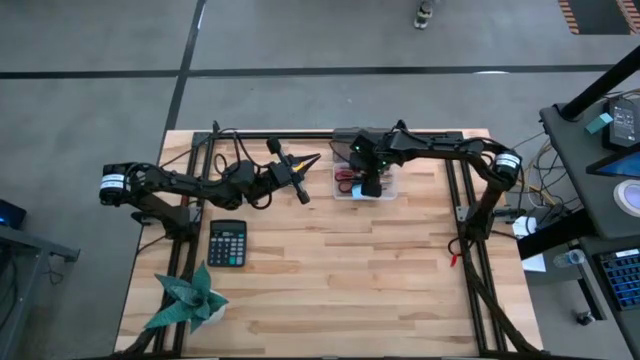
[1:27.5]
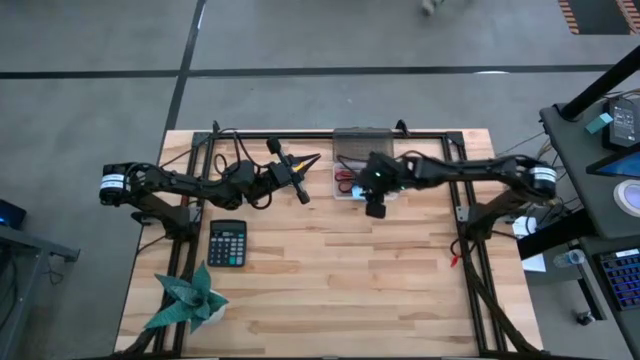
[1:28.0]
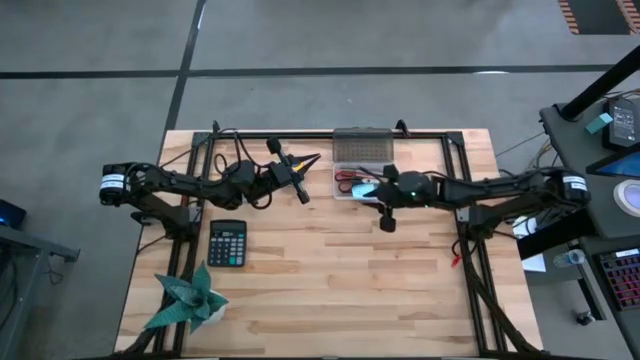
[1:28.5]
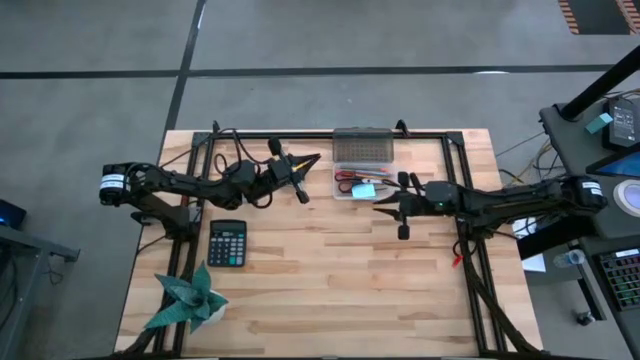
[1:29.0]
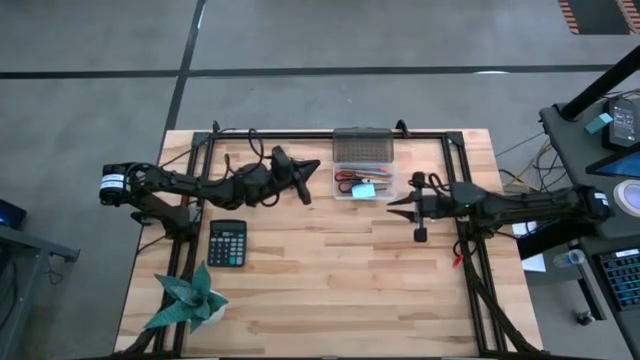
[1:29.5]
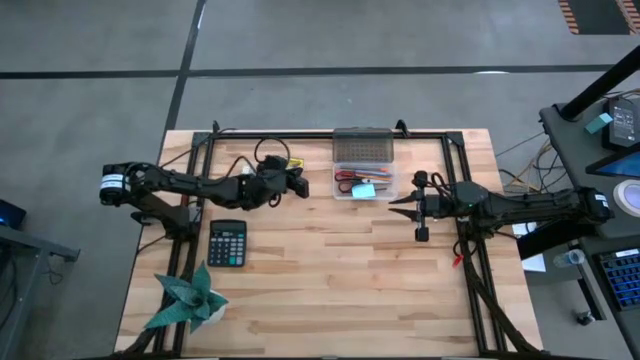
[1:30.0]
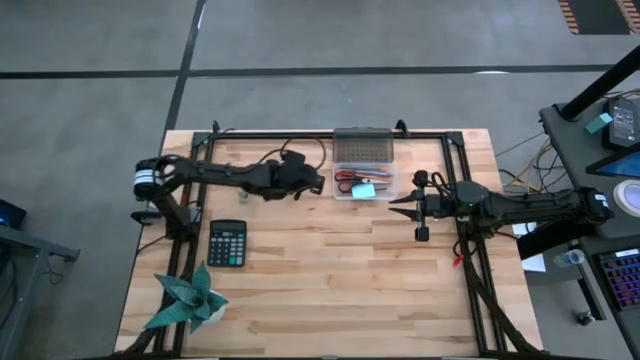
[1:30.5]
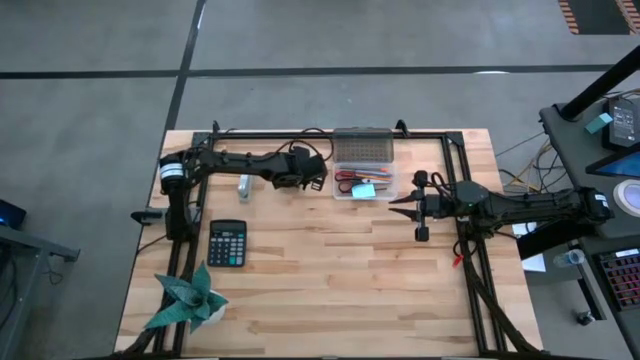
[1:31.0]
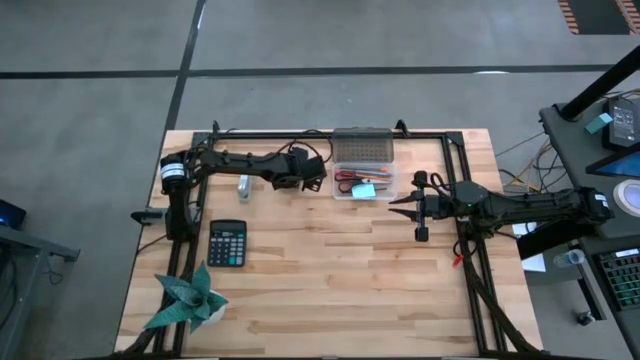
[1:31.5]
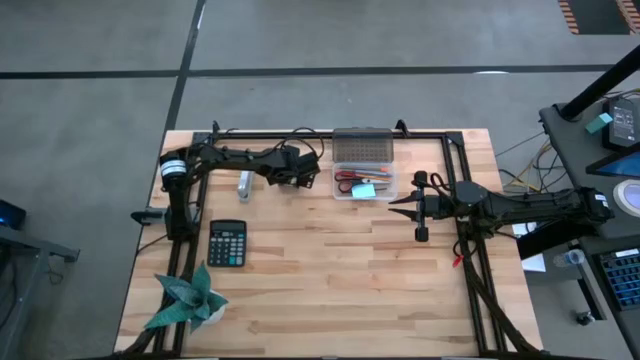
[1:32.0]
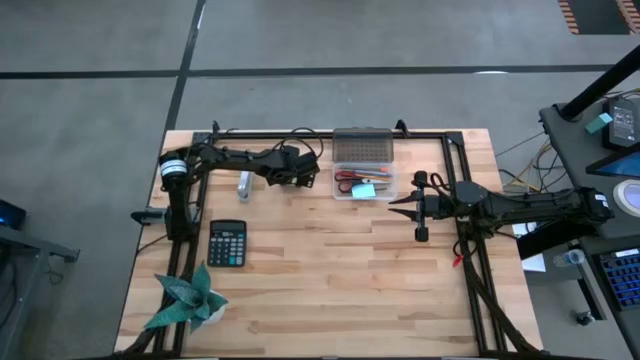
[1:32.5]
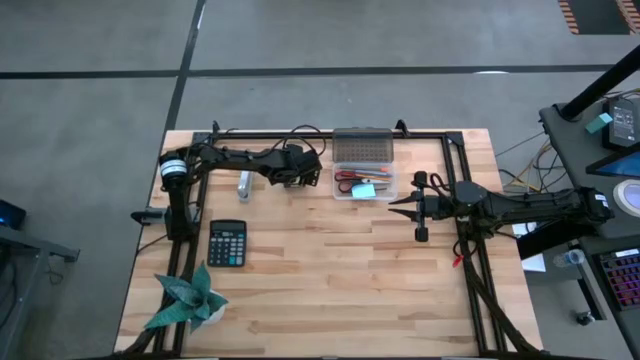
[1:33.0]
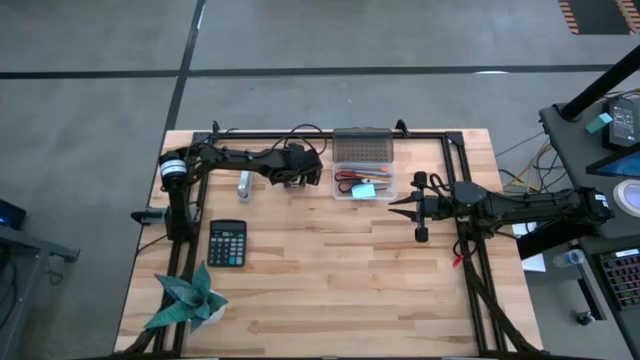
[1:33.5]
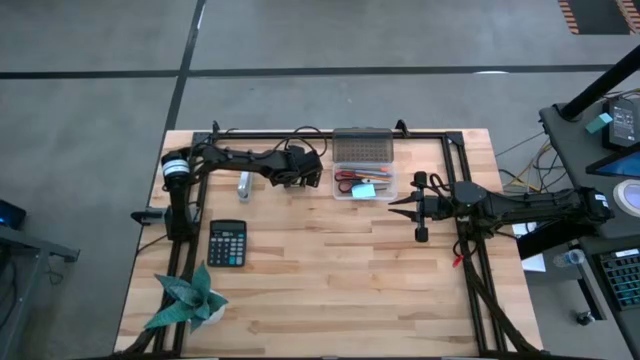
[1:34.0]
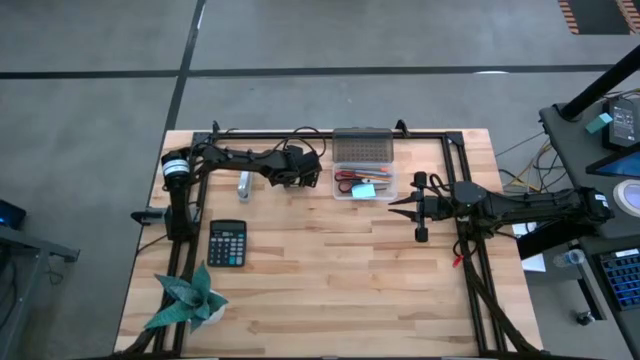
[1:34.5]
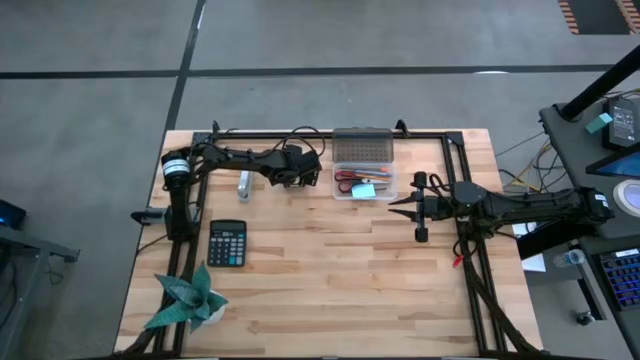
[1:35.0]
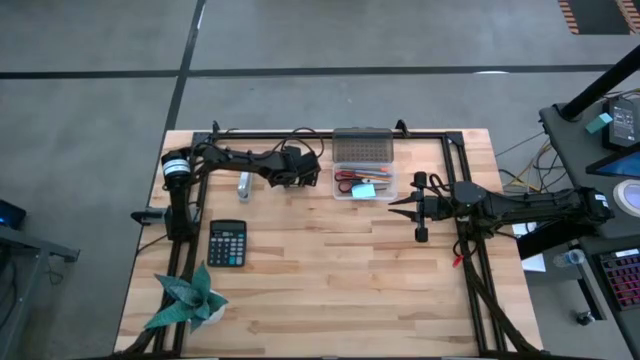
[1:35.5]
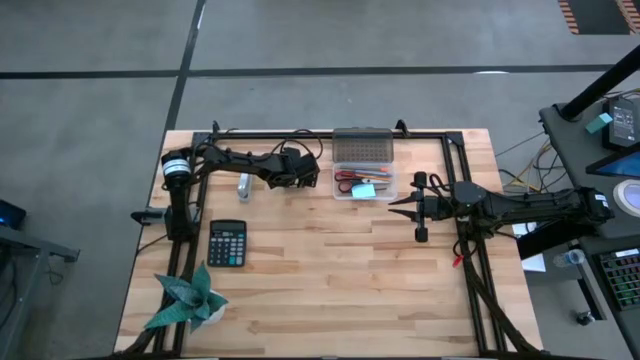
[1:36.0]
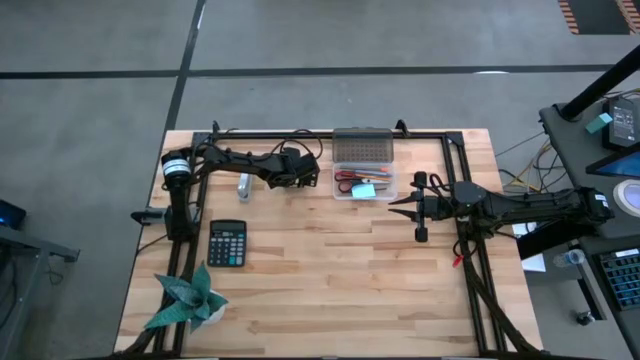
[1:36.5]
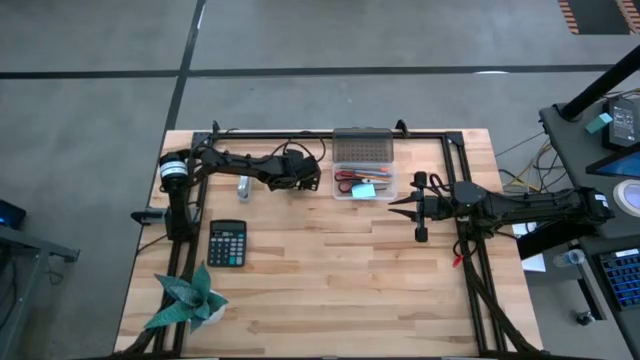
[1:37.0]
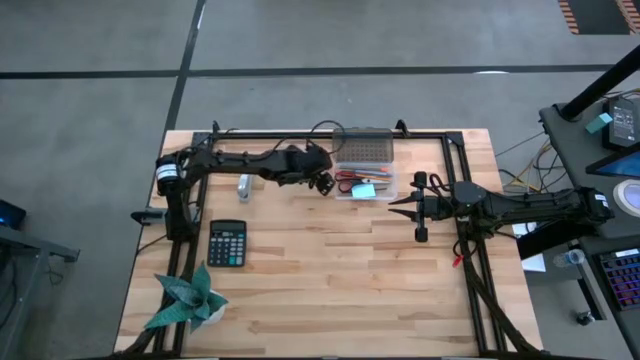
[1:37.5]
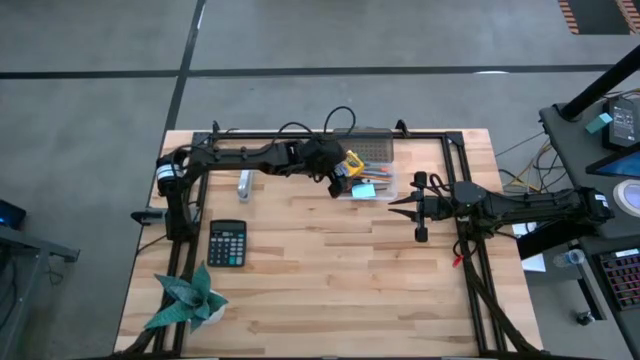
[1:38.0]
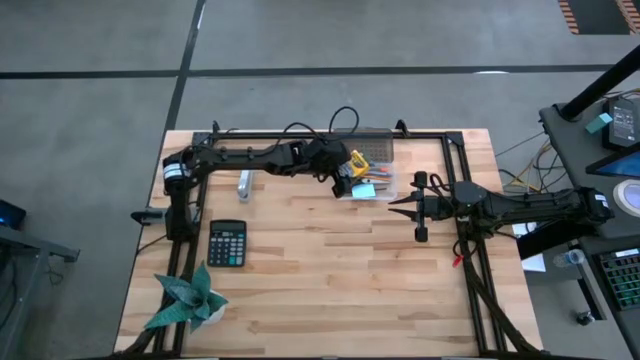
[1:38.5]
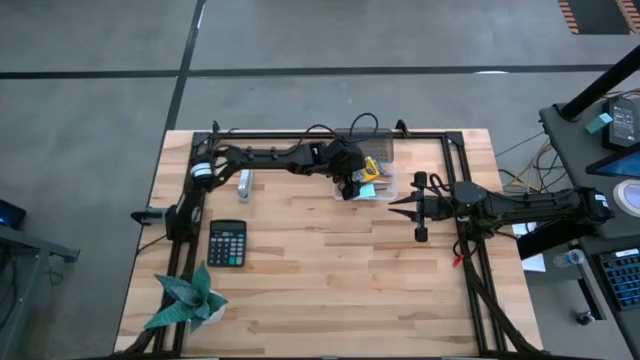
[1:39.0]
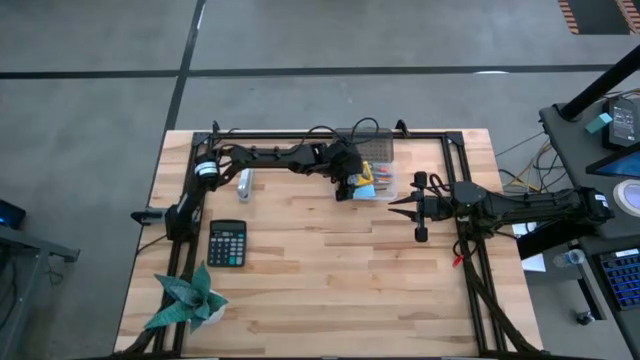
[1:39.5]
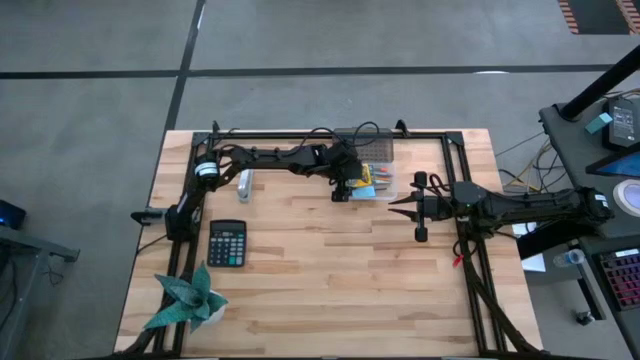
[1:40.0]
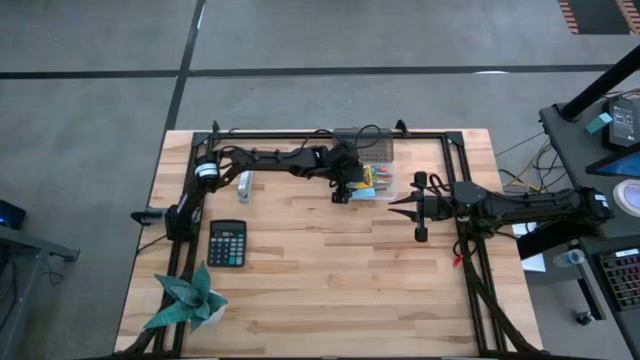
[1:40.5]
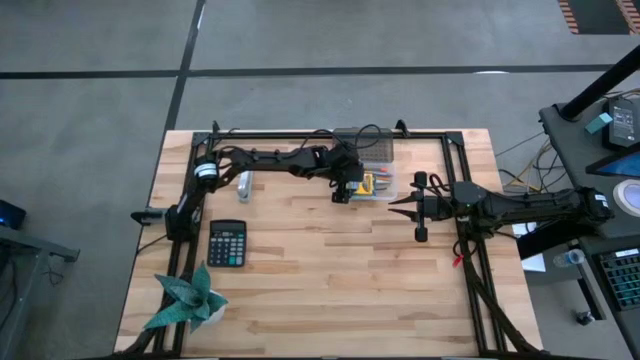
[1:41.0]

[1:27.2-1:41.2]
Task: Pack school essentials
Put the box of crayons into the transparent supply box

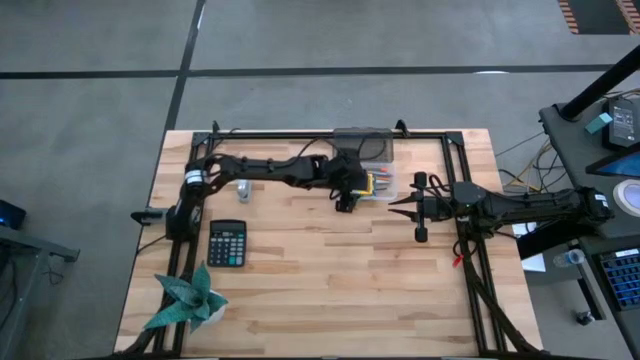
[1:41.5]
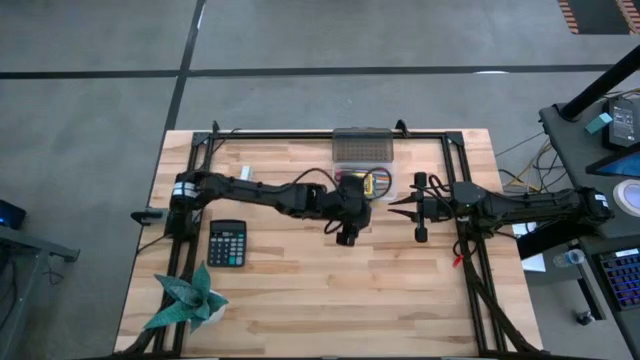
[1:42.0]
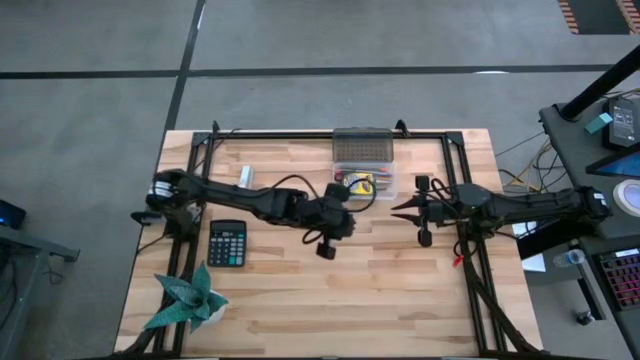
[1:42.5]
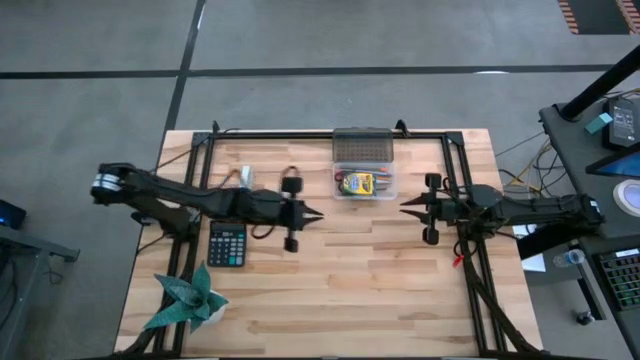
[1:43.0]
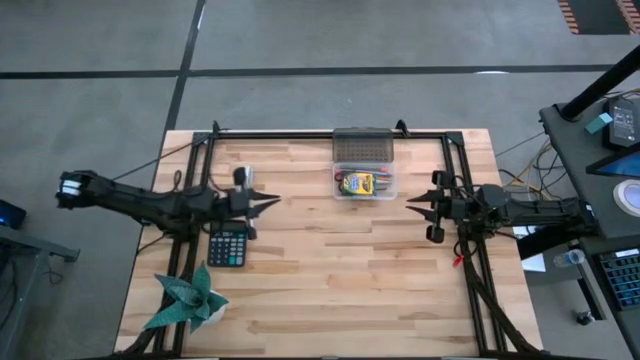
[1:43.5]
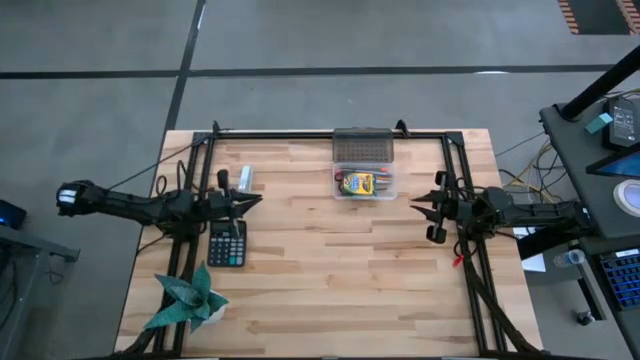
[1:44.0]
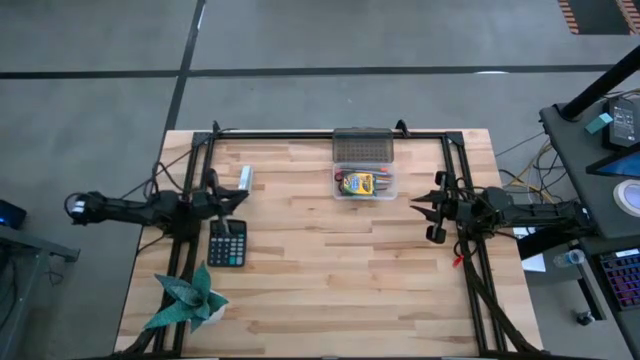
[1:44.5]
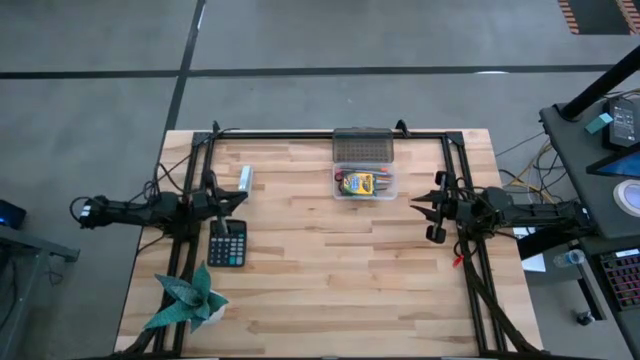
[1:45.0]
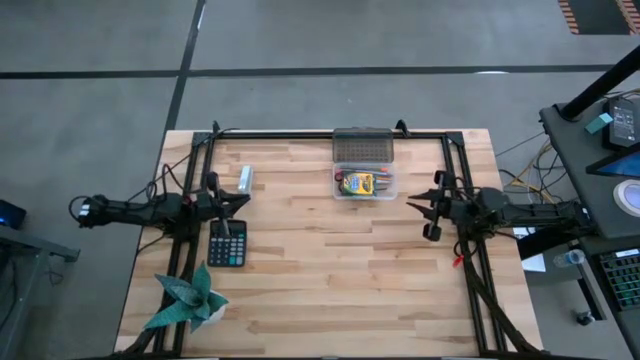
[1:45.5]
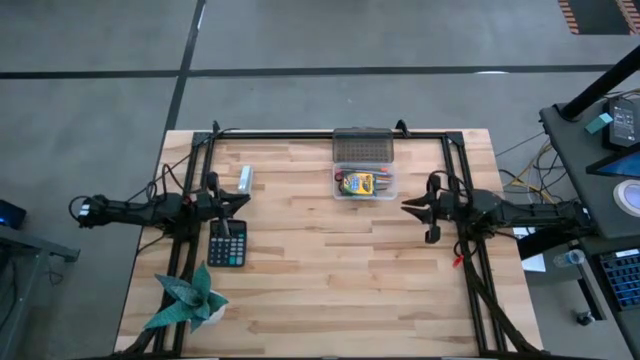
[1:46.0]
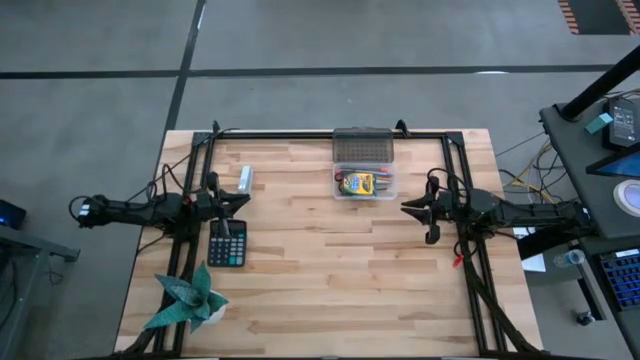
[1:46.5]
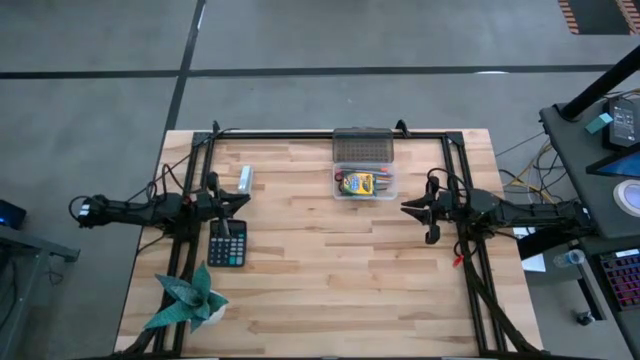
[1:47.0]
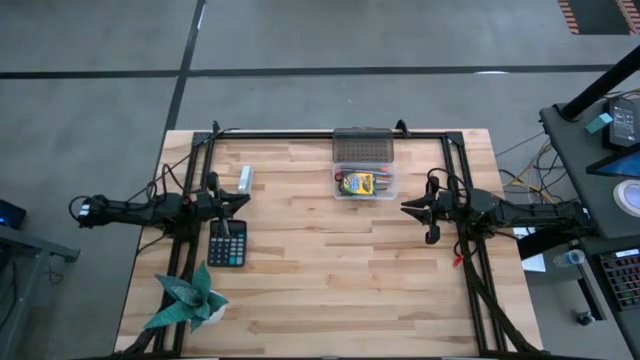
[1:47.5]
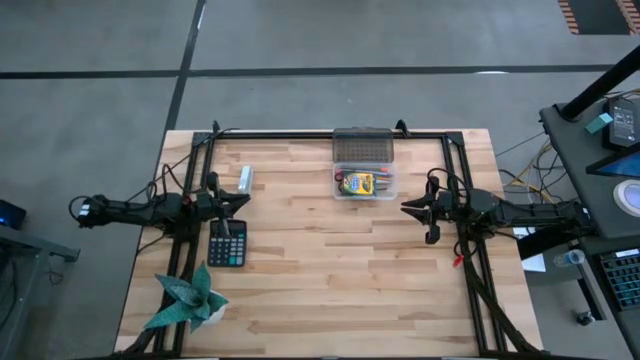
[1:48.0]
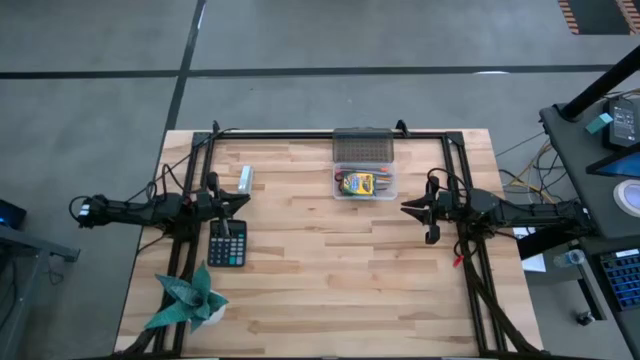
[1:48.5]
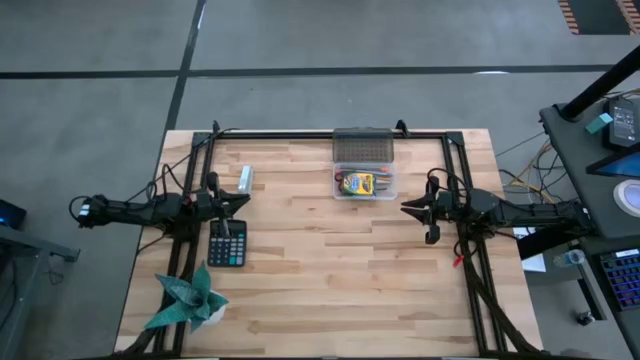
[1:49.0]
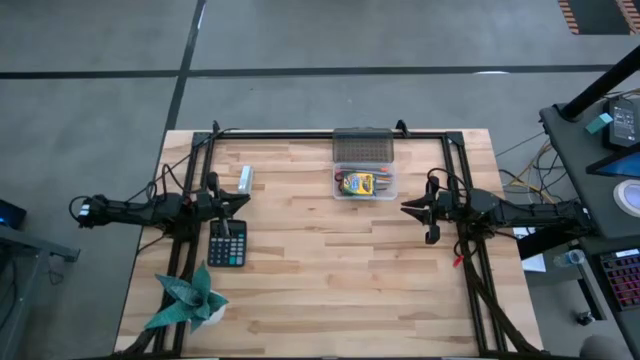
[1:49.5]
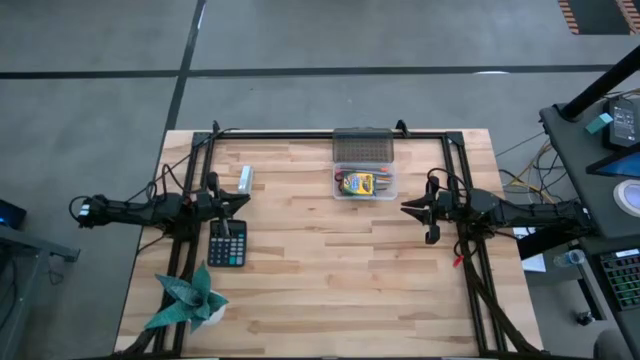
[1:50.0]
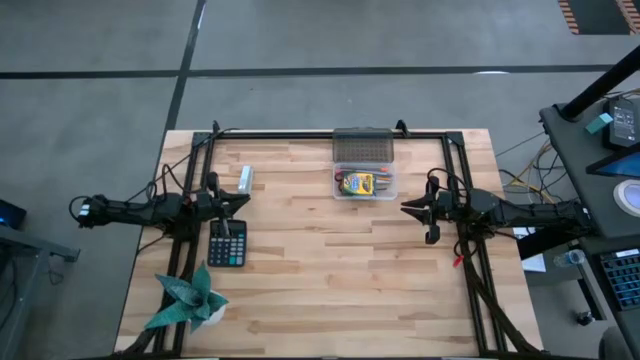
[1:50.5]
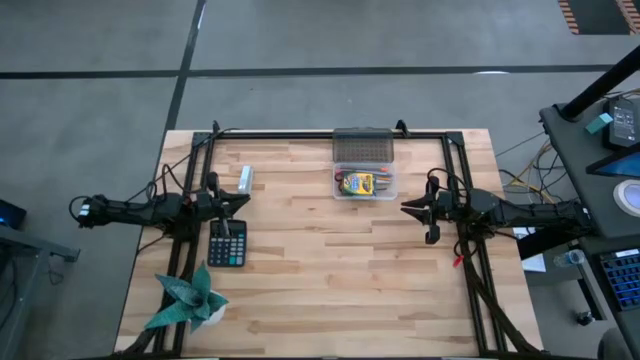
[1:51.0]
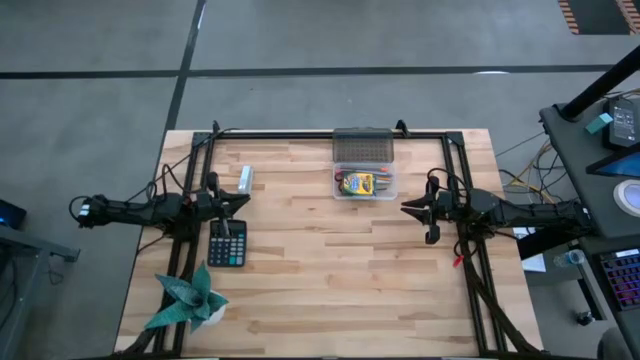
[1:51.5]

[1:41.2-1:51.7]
Return to Home Position
